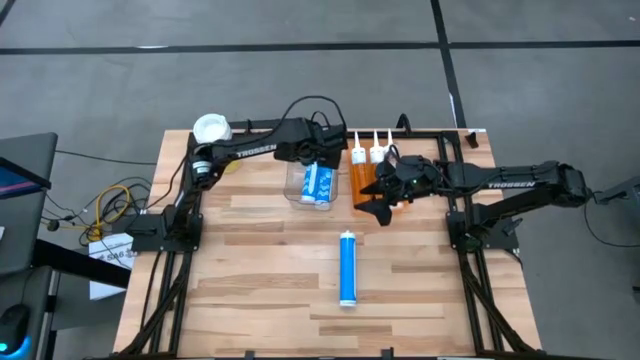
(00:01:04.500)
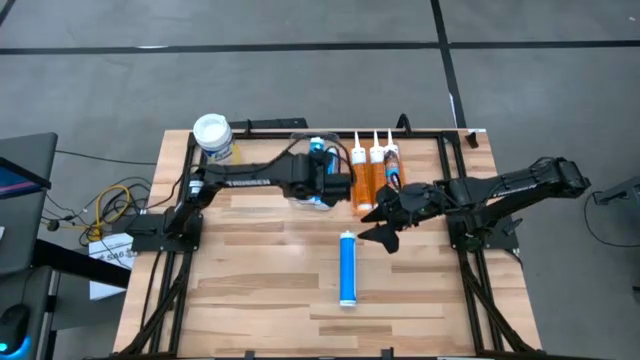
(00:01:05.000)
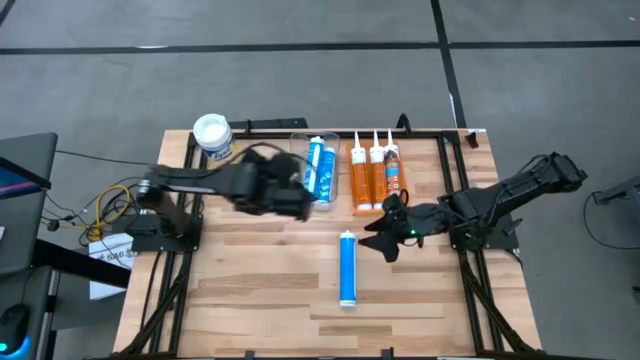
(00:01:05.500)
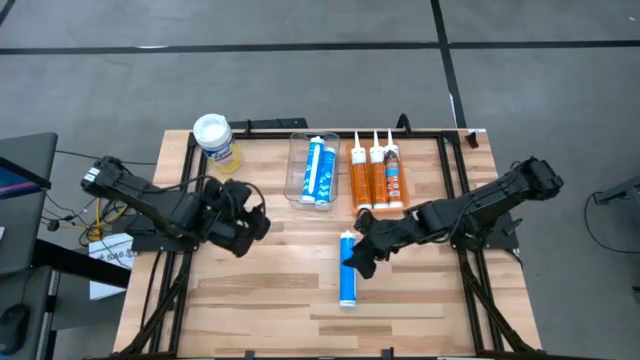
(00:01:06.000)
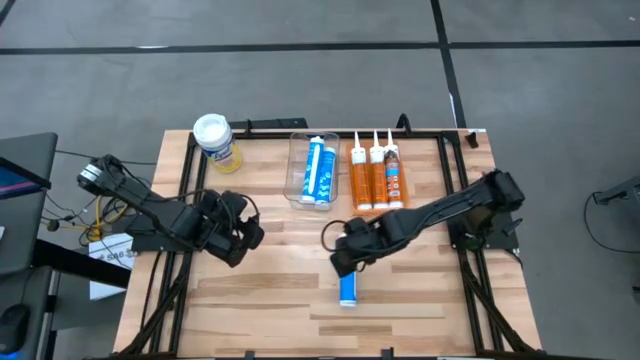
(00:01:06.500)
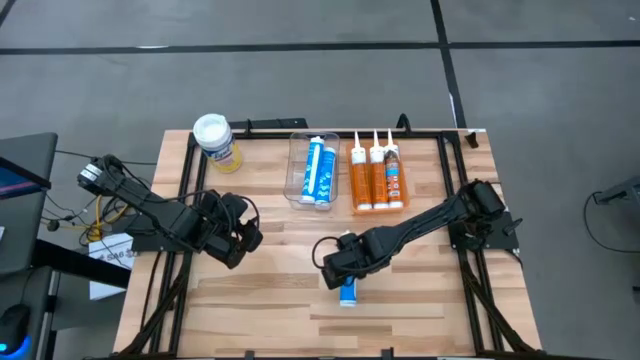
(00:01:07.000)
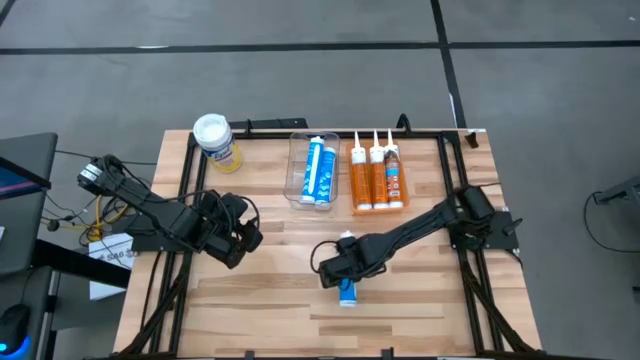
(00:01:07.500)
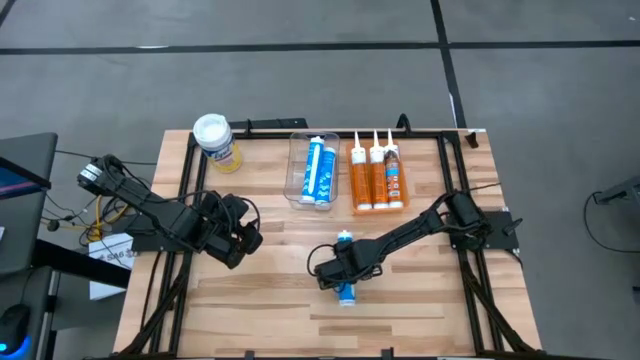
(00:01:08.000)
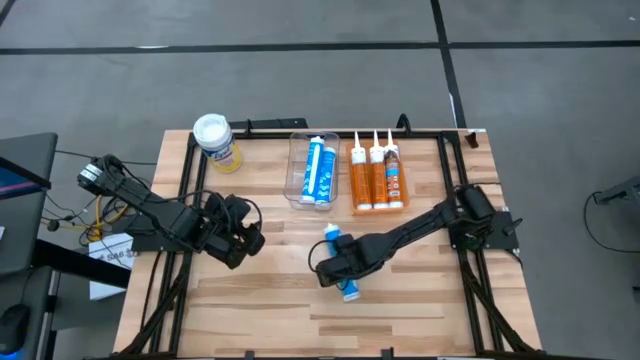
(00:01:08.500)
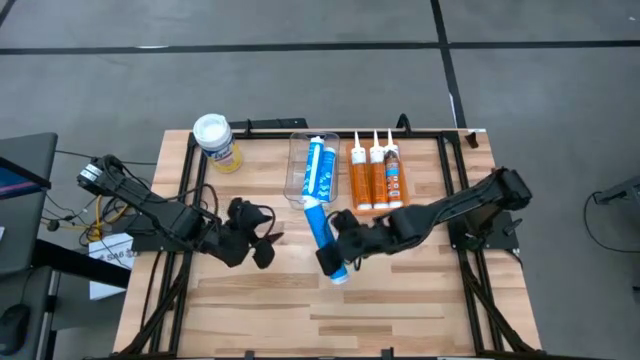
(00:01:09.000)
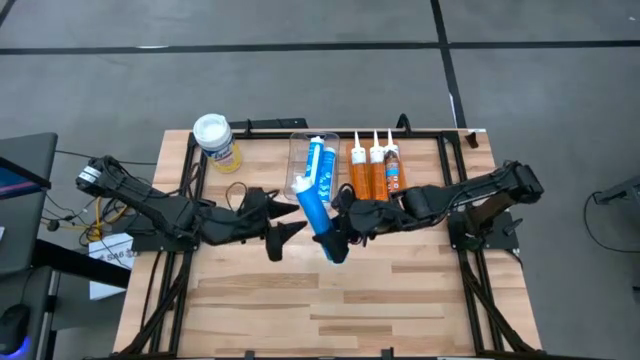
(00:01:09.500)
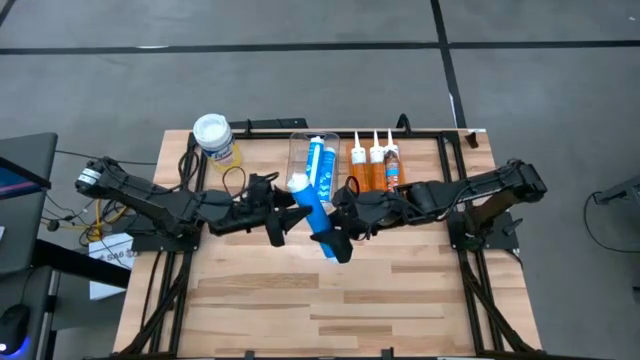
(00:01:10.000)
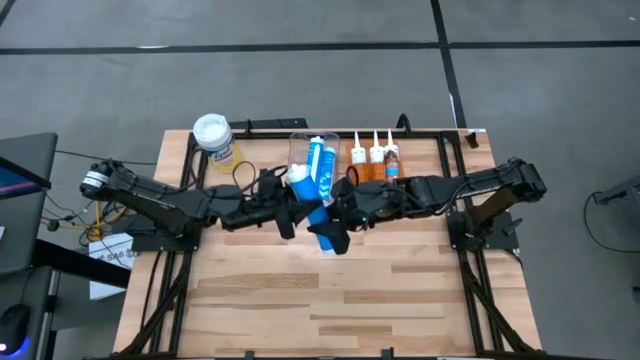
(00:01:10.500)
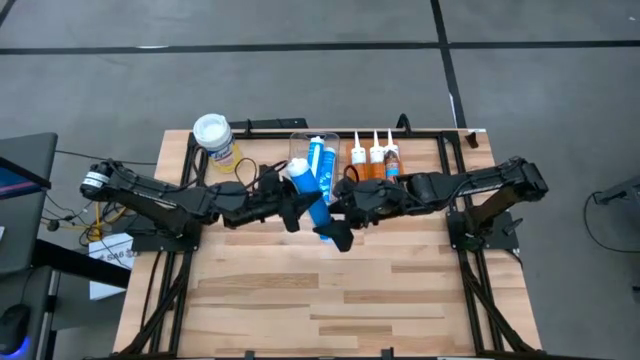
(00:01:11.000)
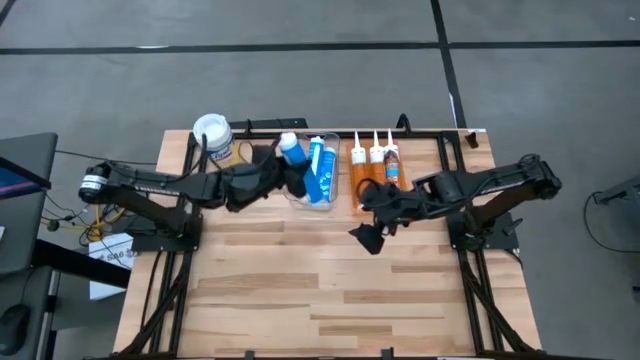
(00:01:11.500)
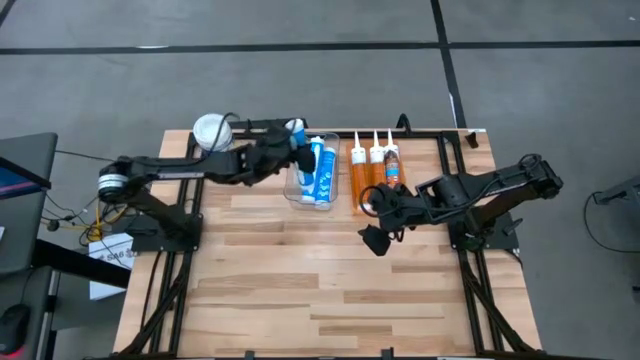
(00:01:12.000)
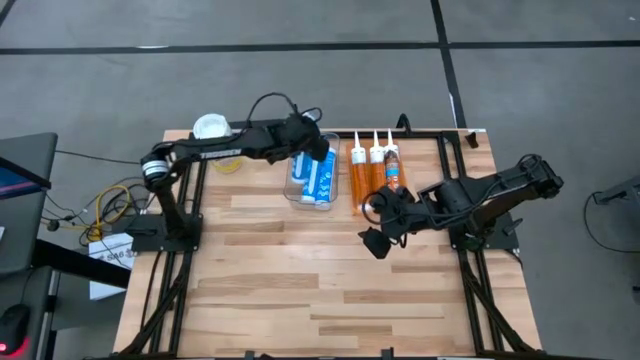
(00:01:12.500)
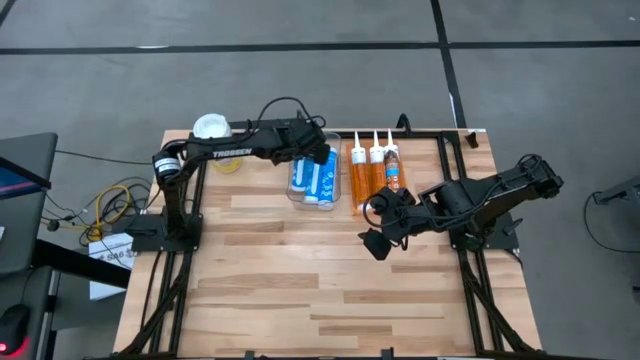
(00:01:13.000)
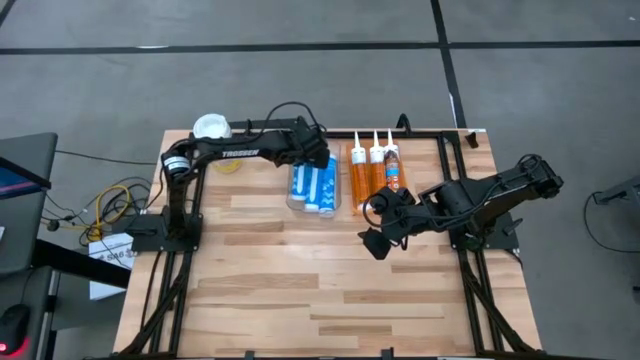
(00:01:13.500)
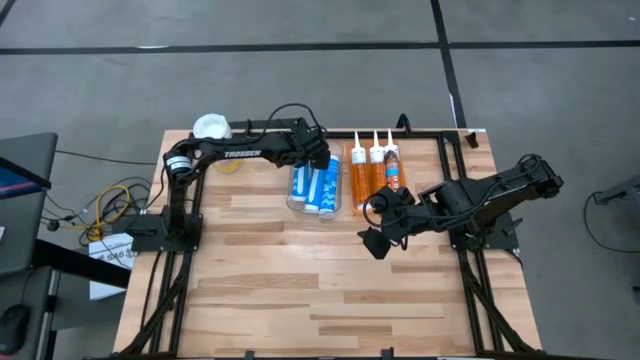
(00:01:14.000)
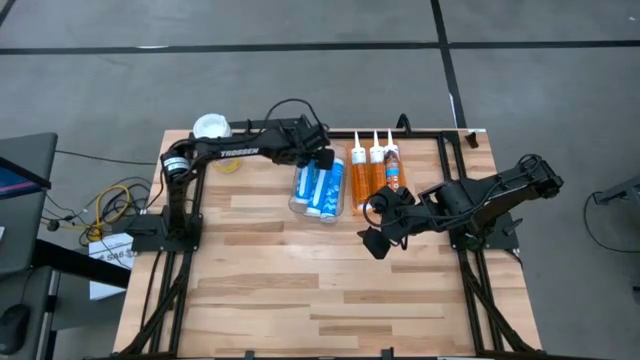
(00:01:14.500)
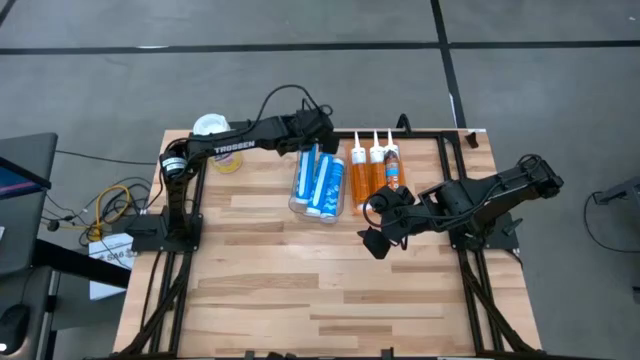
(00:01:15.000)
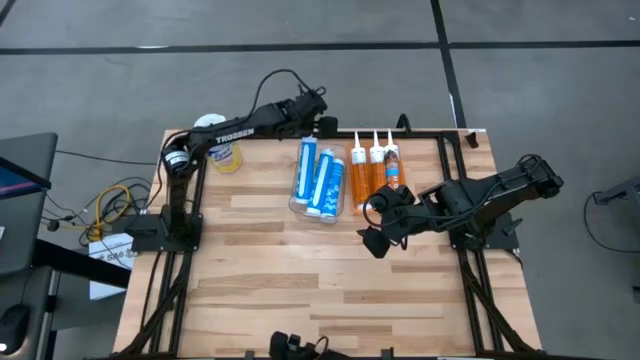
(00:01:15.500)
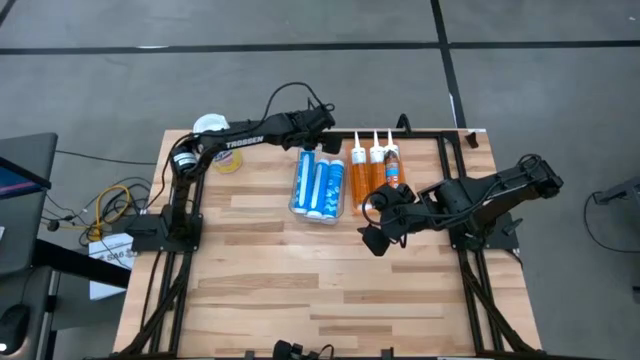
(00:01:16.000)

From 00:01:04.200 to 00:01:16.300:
Task: Pick & place silicon tubes, Sealant and Lysol wipes
Put the blue sealant into the transparent bin

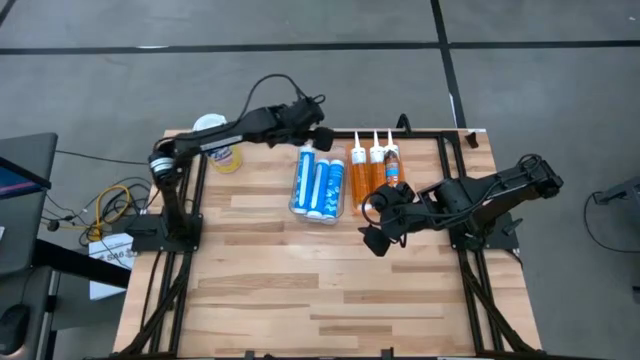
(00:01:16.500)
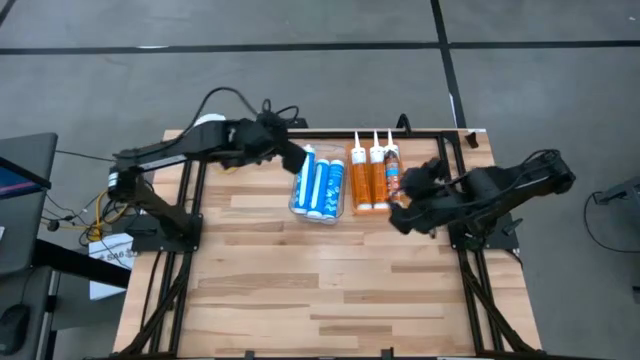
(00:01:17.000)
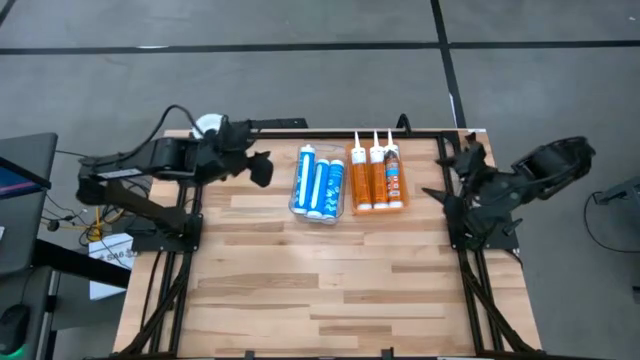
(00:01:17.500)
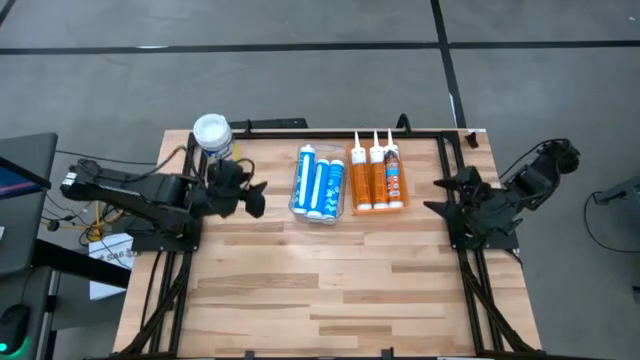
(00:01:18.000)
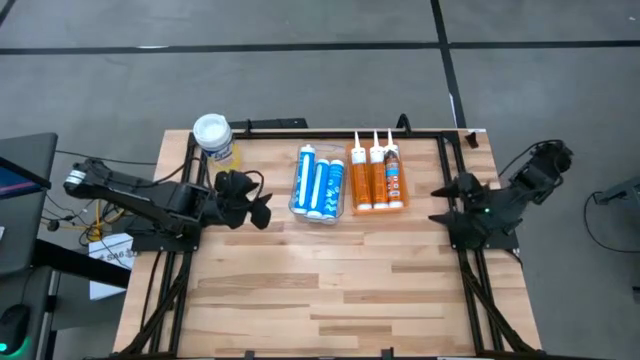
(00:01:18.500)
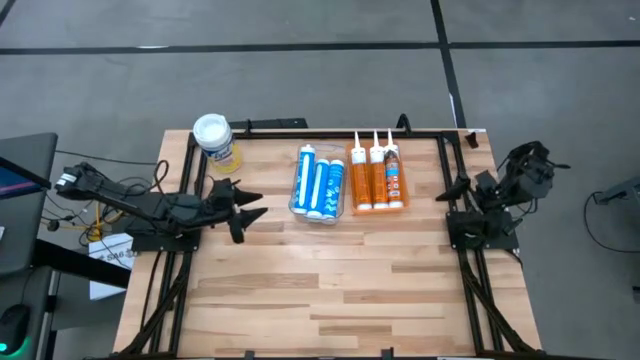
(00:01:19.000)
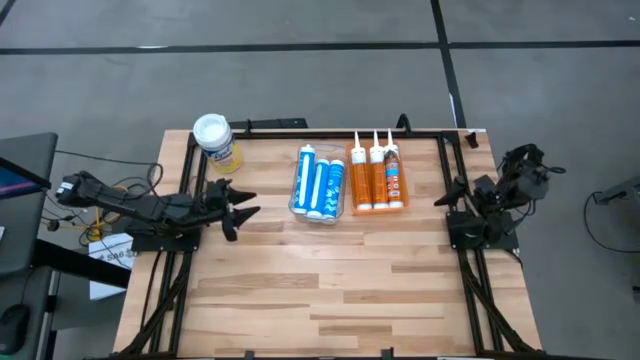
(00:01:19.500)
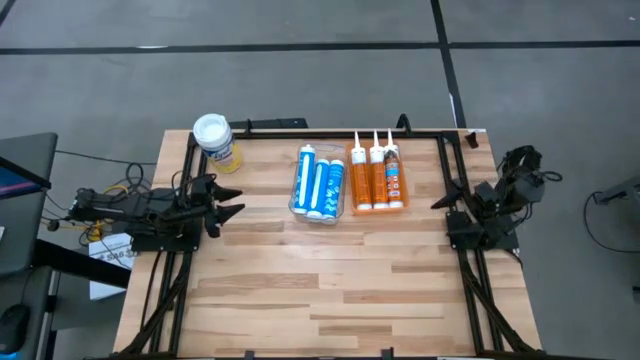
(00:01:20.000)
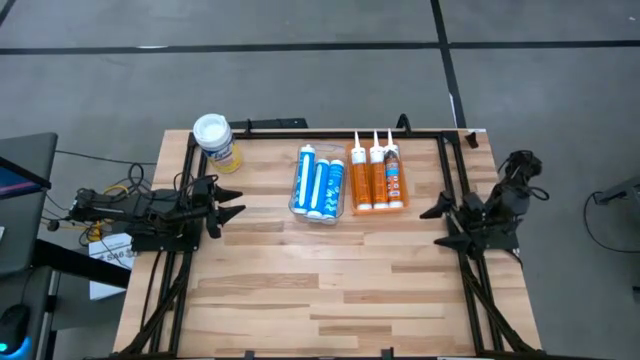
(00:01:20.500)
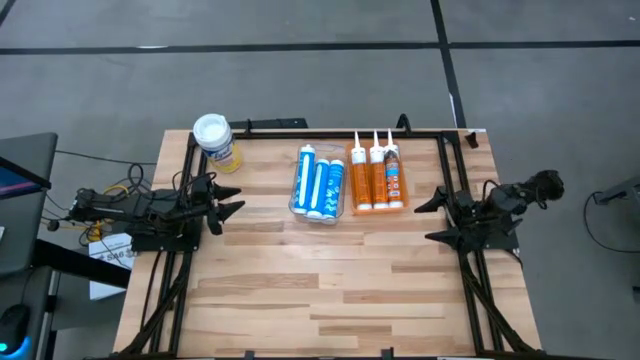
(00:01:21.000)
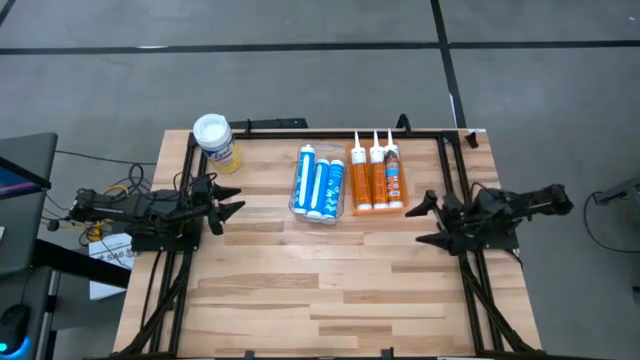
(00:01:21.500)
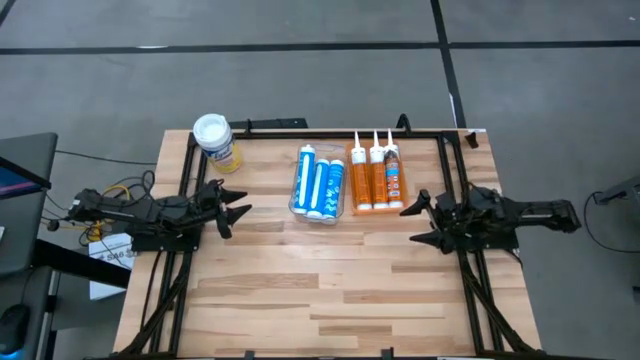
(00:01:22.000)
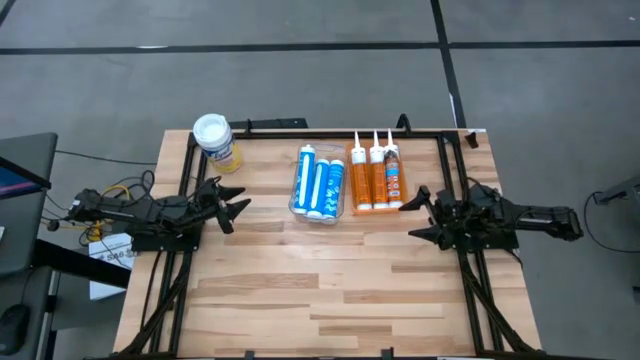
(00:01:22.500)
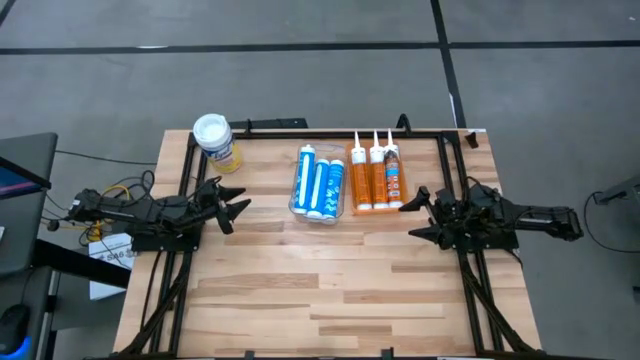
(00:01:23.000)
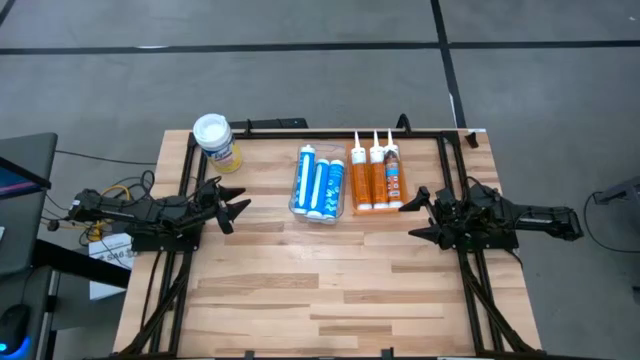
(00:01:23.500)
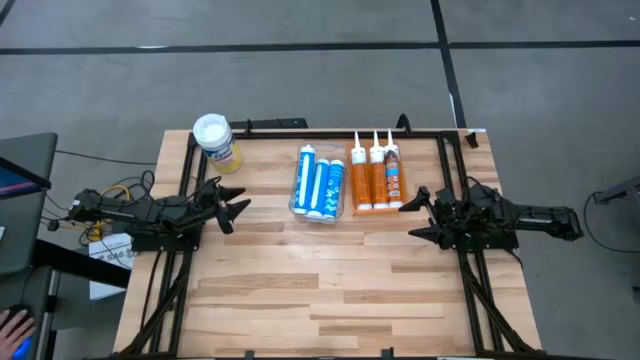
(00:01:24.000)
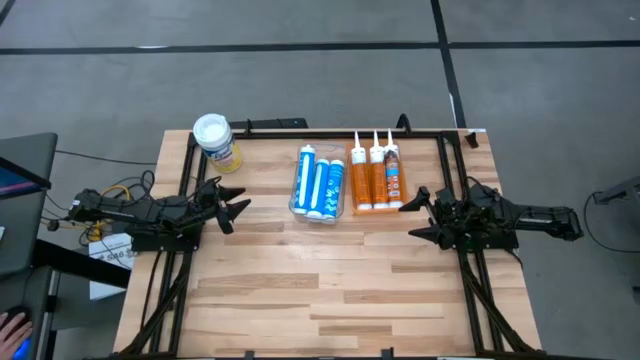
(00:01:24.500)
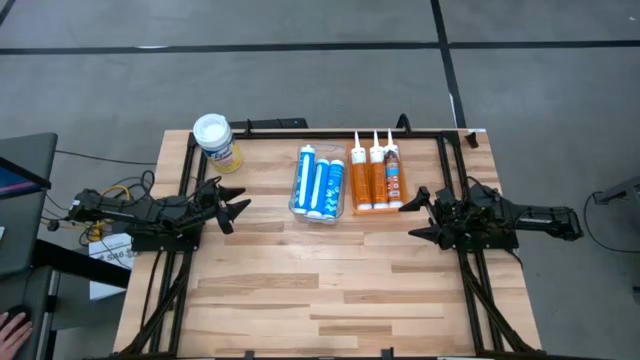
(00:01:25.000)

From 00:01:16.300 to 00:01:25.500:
Return to Home Position
